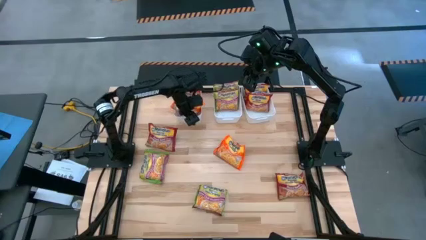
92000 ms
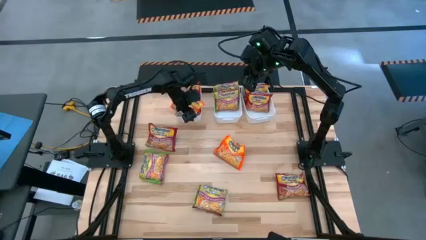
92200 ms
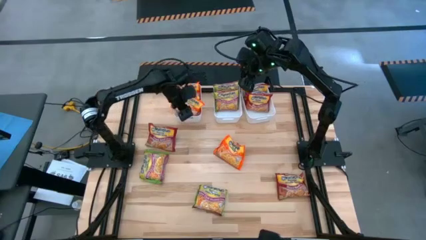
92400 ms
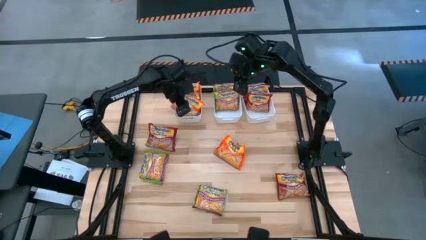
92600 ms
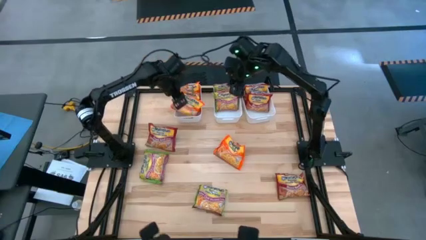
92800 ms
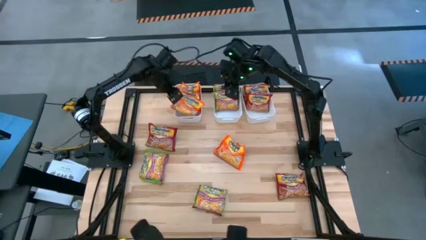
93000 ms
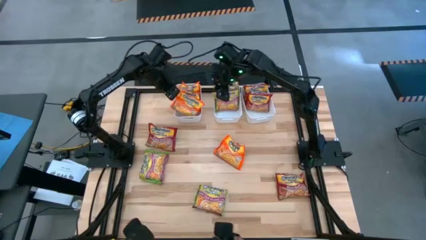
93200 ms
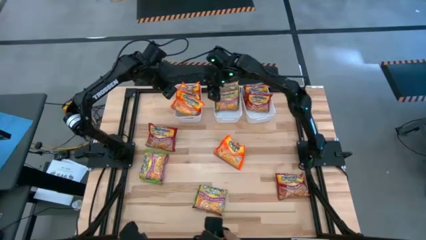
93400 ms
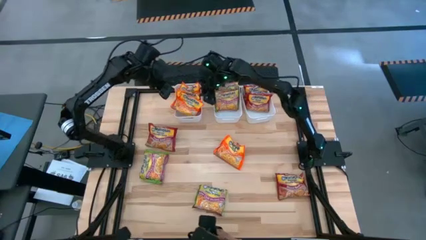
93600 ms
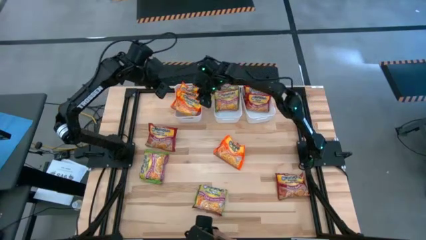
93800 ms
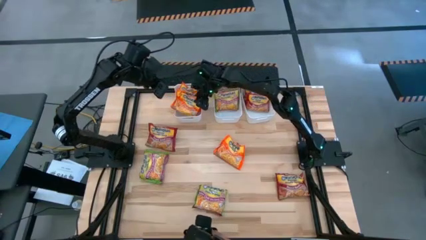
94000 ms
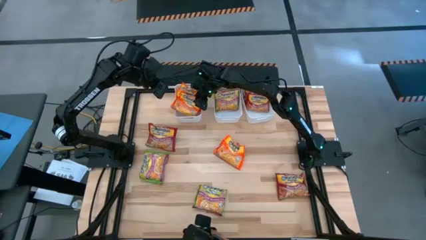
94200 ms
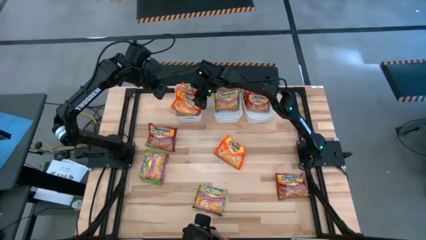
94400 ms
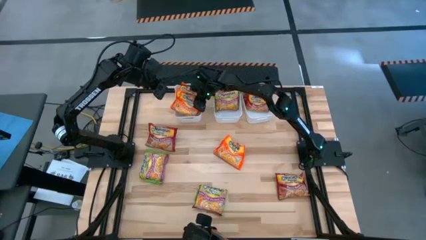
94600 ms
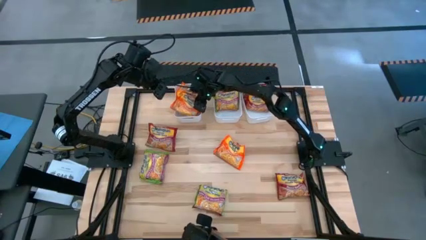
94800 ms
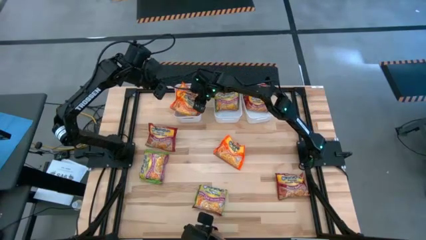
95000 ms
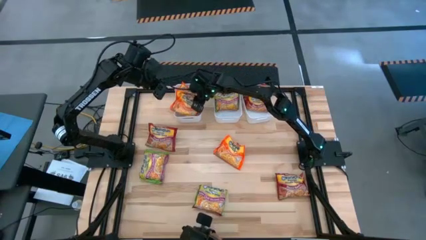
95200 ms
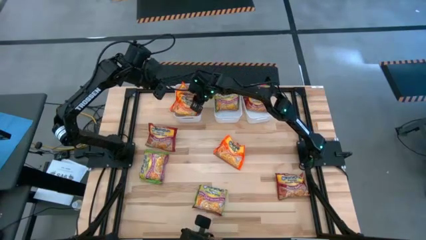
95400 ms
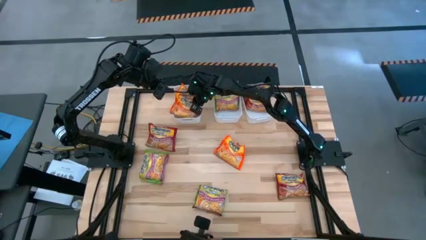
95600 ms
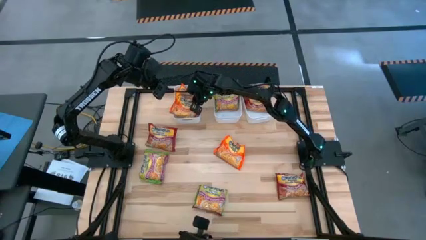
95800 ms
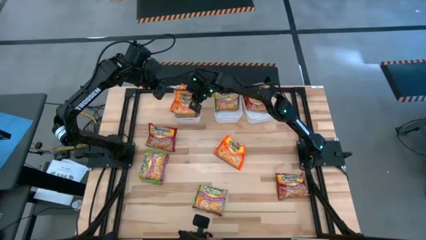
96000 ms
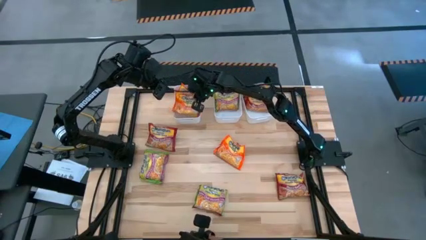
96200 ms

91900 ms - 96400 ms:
Task: Sort Maruchan noodles
Adjust the orange noodle pack

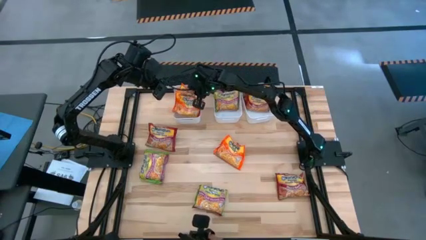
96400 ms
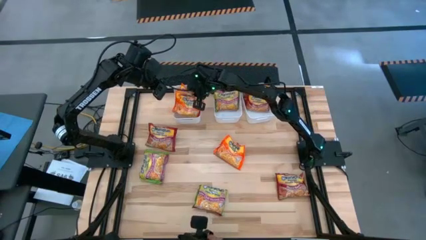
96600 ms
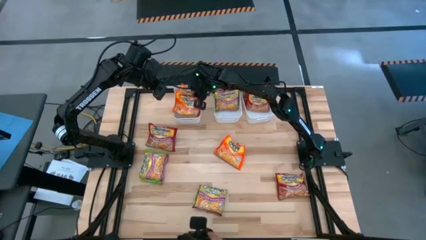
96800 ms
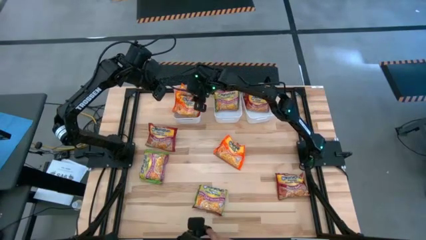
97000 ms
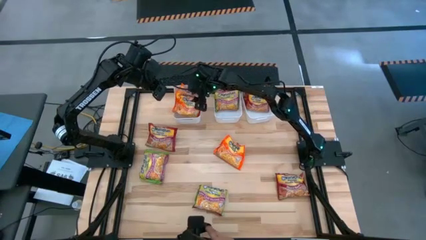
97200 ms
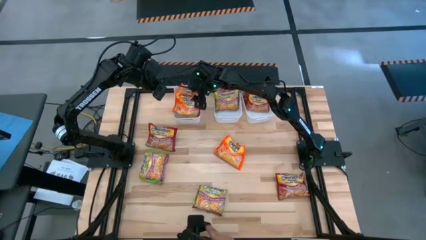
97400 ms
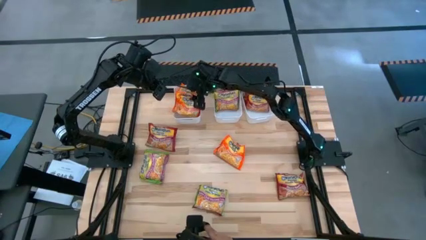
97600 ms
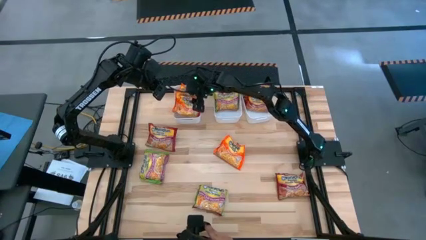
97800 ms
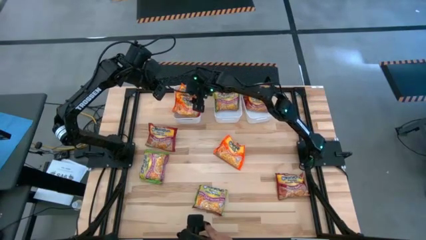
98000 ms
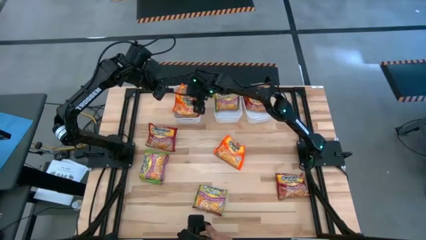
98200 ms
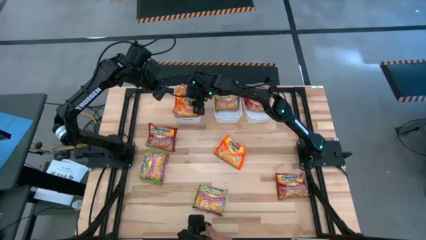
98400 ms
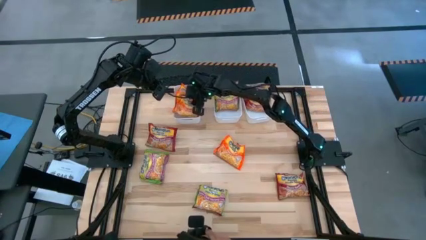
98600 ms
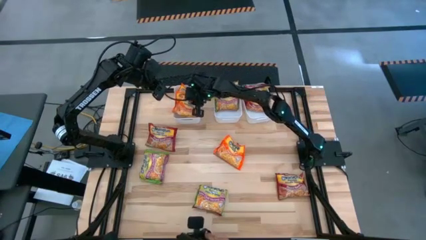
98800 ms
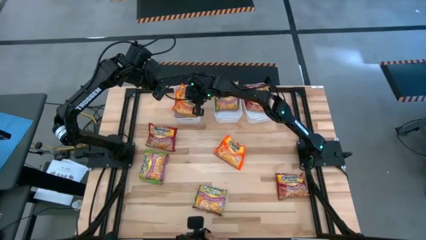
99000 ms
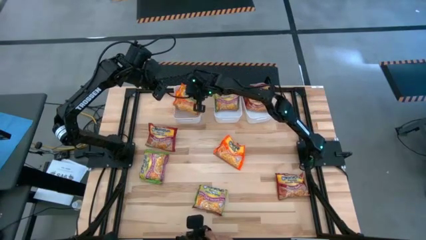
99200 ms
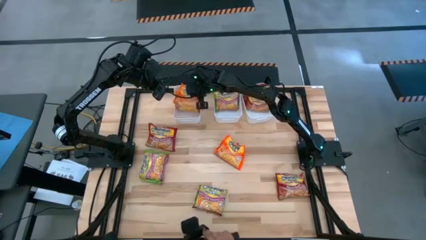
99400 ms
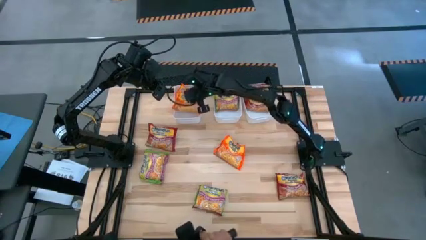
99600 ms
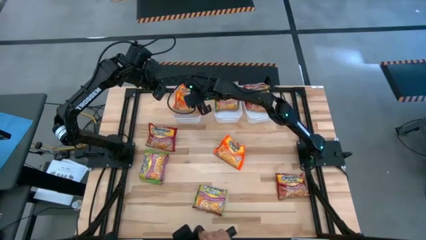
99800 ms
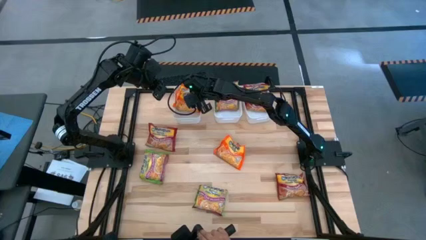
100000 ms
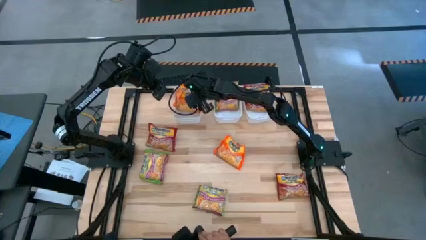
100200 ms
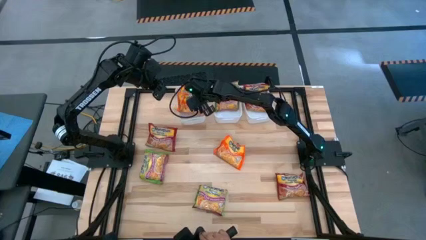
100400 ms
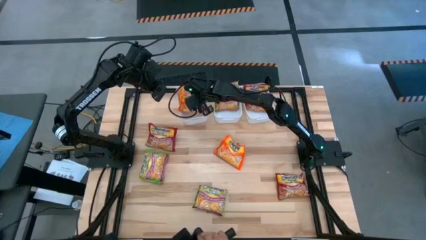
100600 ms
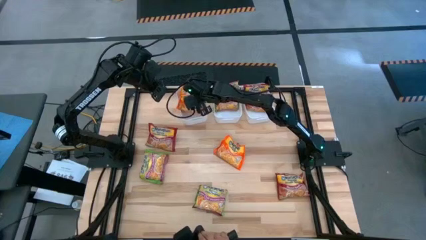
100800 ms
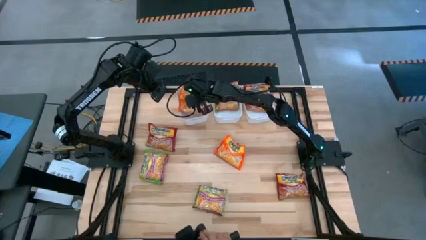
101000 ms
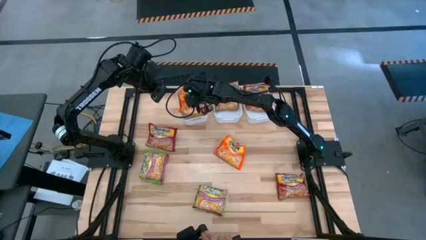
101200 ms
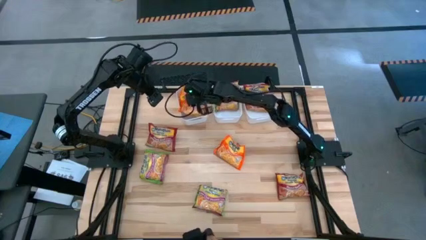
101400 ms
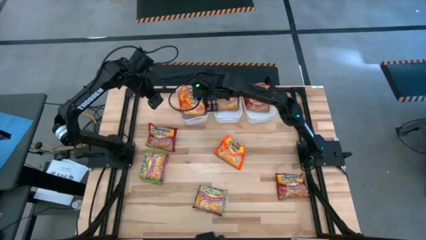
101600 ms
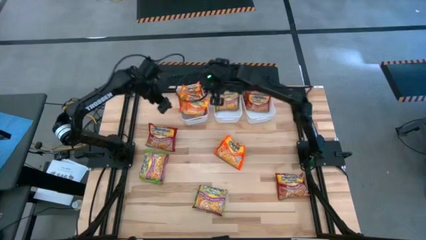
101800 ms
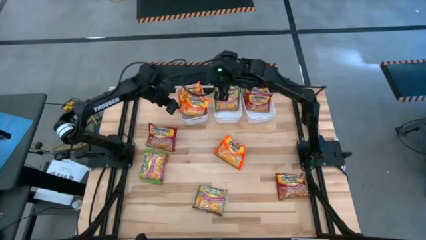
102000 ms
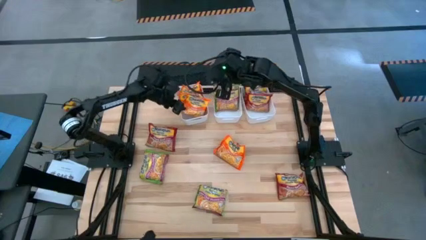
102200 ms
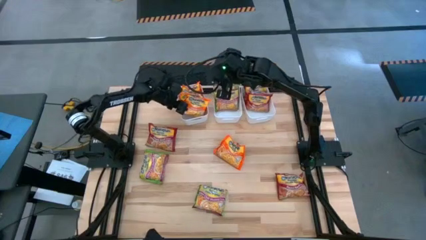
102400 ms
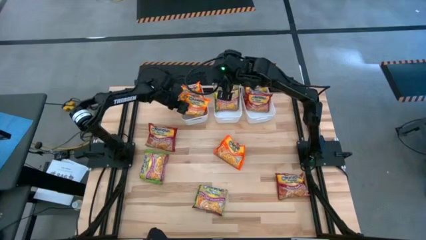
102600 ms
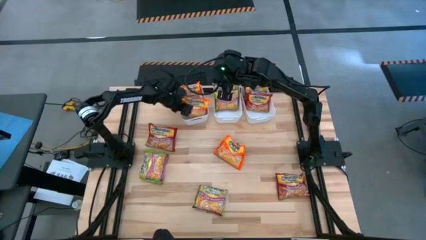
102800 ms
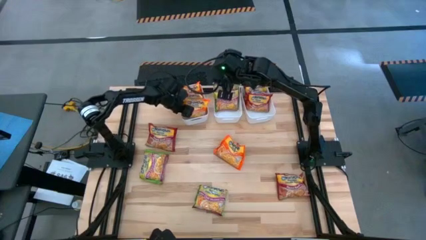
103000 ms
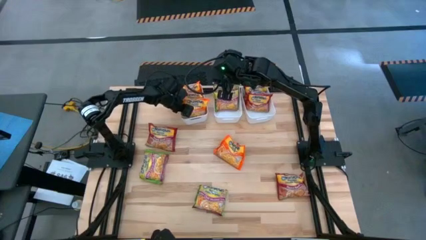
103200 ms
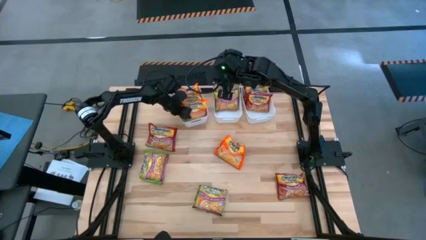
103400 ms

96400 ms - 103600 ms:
Adjust the orange noodle pack

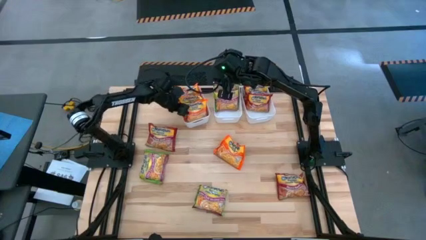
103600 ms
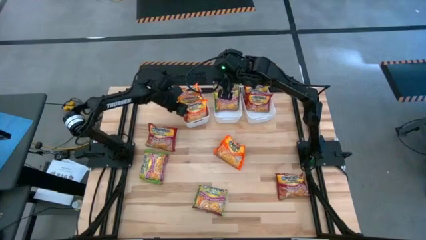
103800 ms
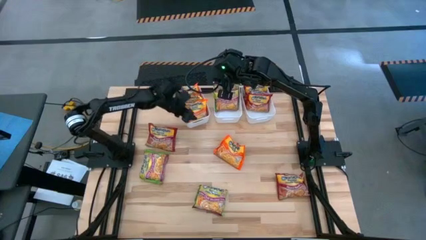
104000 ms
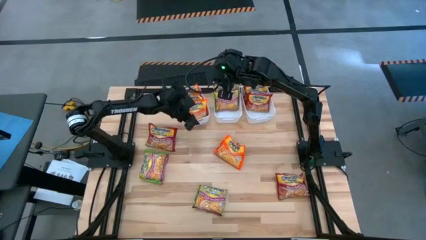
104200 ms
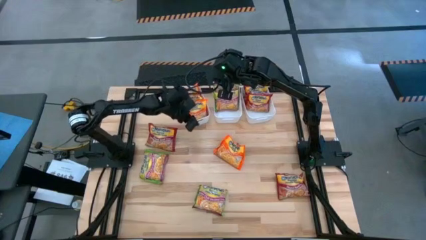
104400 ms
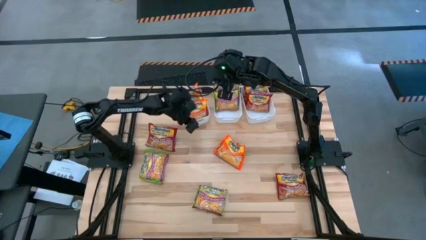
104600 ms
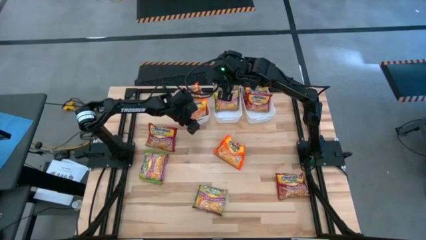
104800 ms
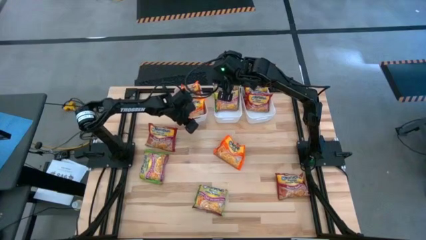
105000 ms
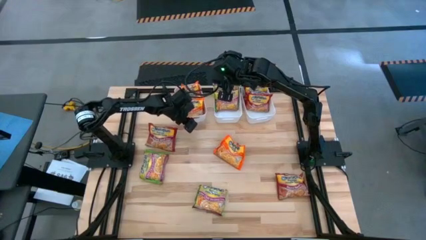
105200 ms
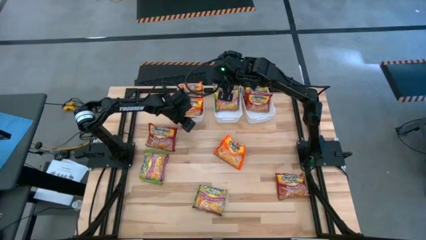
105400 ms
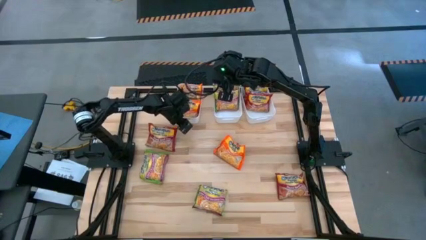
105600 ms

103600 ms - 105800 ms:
Adjust the left white bin
